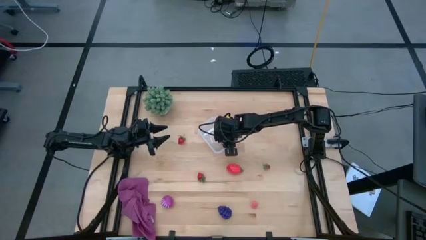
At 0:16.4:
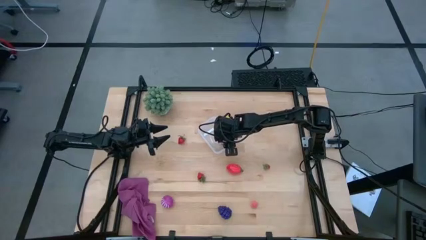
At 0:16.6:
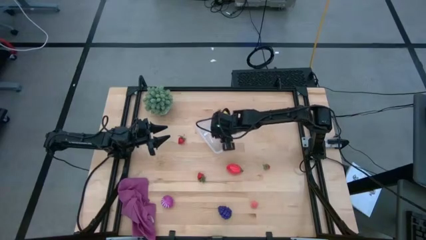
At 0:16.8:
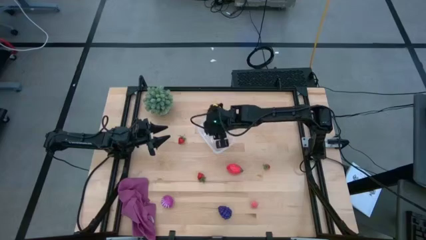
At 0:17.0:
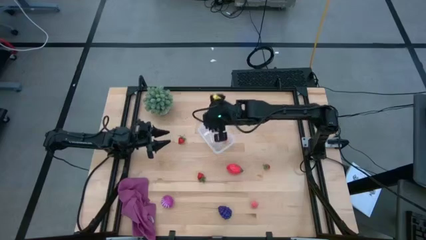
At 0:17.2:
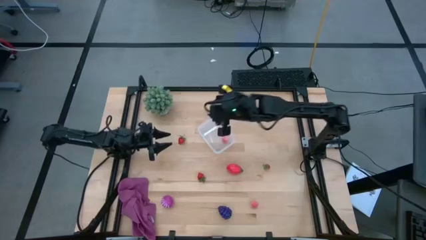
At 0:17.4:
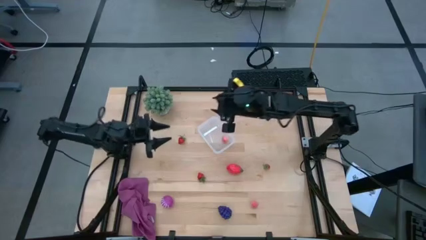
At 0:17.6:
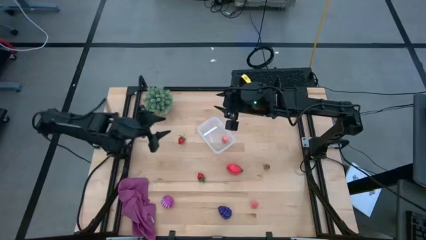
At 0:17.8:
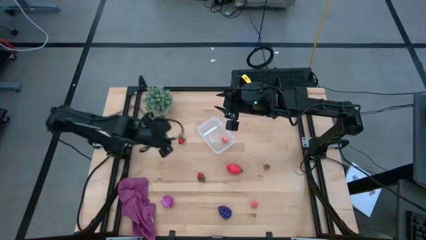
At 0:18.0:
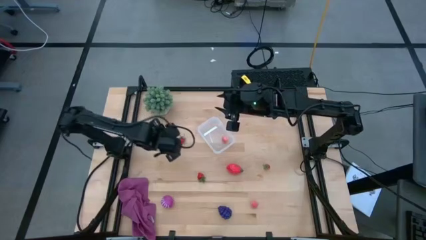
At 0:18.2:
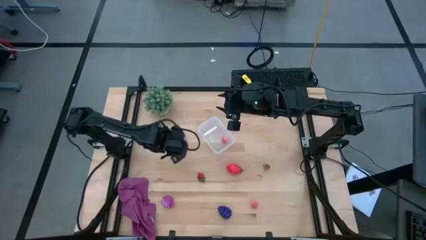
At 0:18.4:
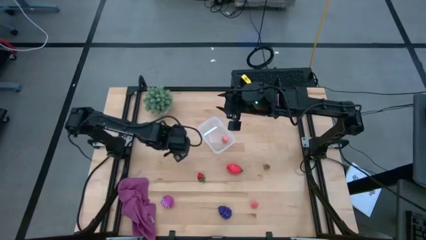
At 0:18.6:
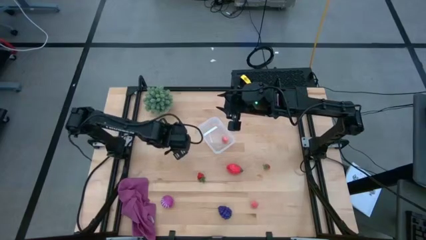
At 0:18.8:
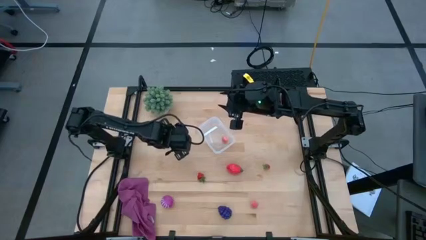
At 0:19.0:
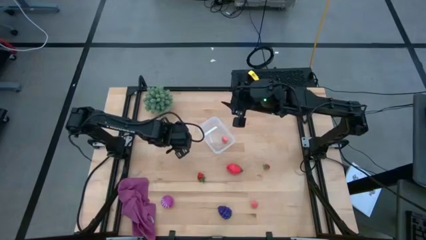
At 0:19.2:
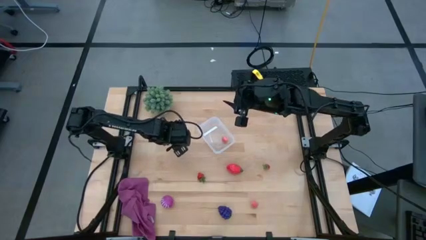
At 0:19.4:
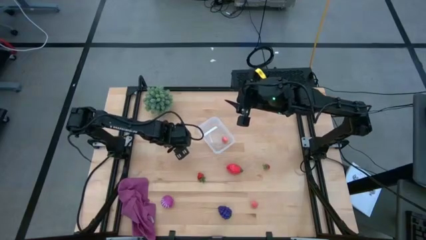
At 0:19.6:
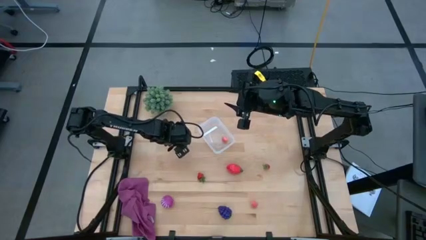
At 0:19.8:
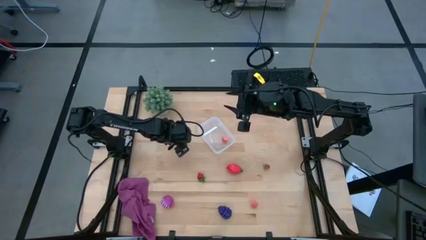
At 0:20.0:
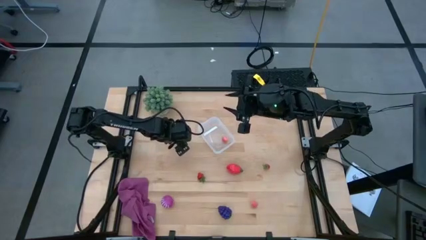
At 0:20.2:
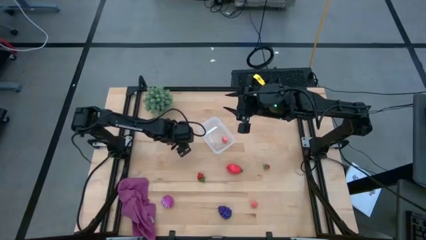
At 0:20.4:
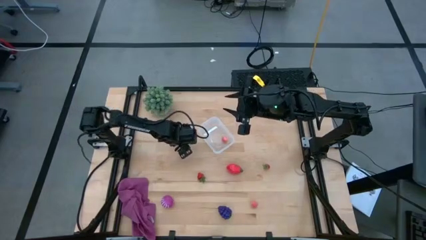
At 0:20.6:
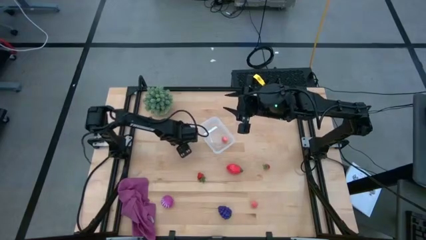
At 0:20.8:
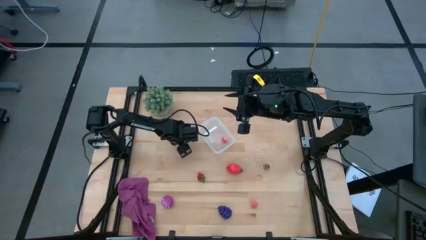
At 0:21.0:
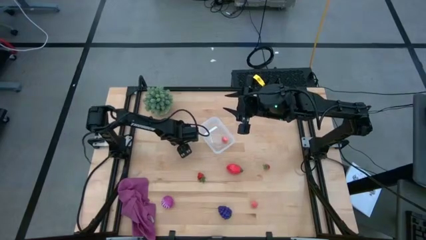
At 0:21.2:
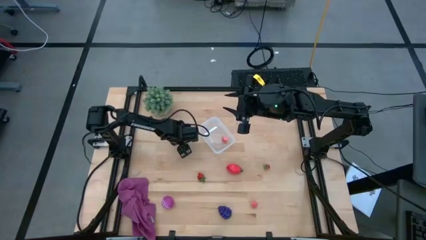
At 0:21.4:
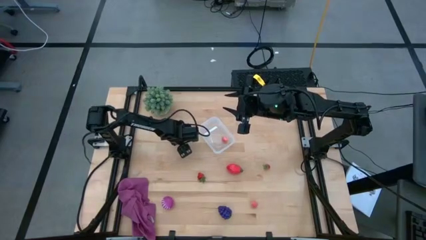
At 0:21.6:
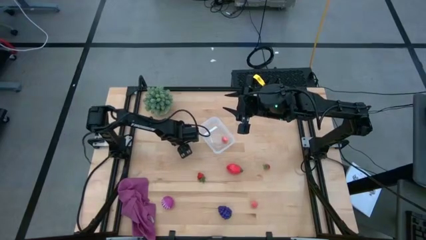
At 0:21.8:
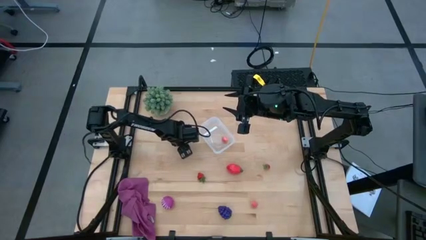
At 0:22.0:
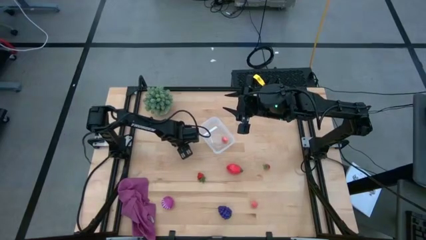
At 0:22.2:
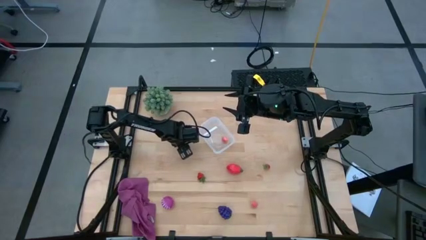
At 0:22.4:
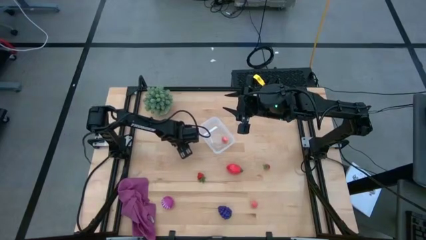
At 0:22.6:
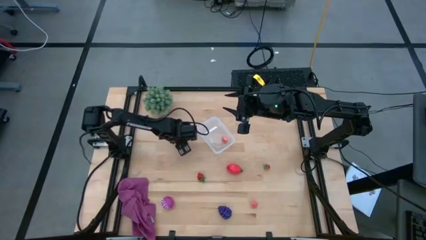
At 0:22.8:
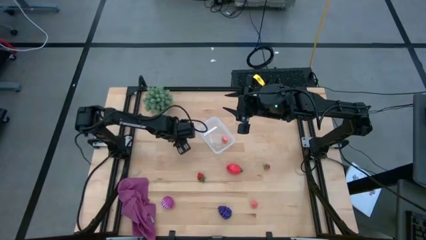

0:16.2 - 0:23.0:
Task: Pick and placing Produce into tupperware
Put the left strawberry into the transparent bin

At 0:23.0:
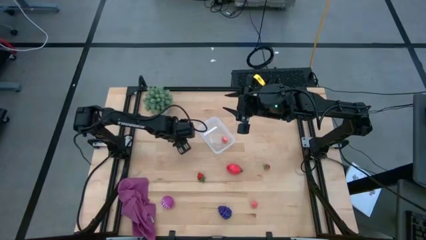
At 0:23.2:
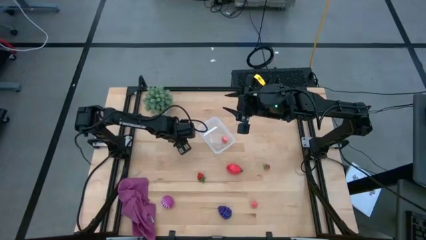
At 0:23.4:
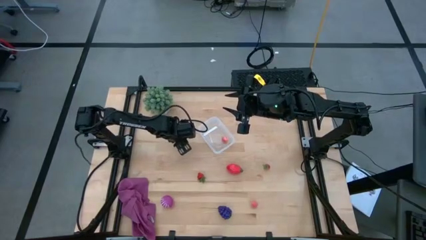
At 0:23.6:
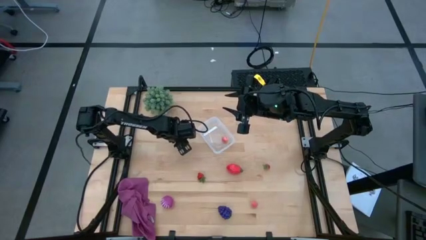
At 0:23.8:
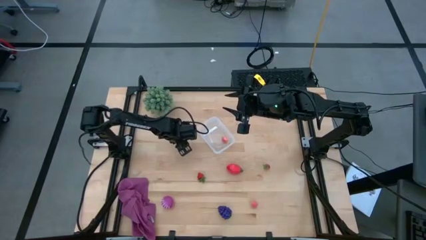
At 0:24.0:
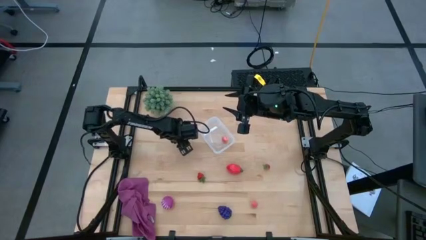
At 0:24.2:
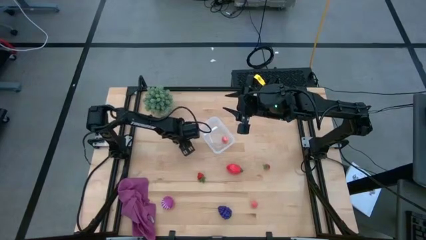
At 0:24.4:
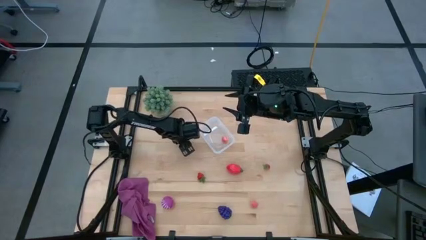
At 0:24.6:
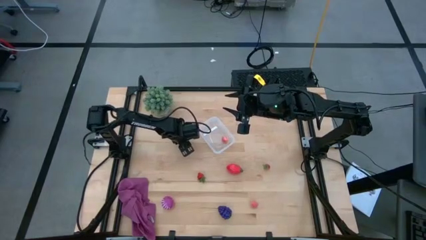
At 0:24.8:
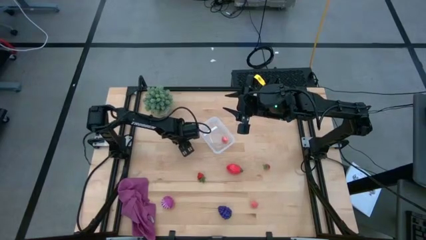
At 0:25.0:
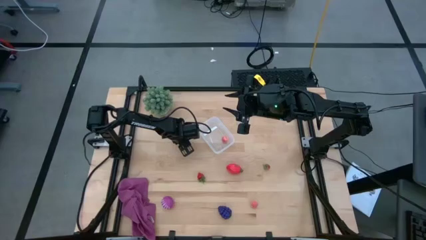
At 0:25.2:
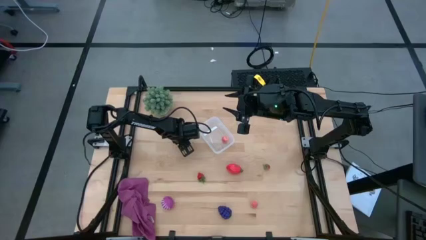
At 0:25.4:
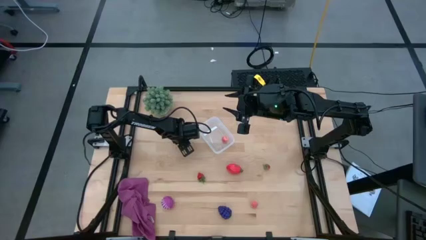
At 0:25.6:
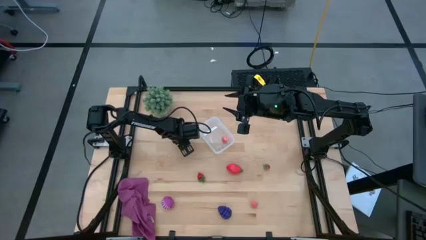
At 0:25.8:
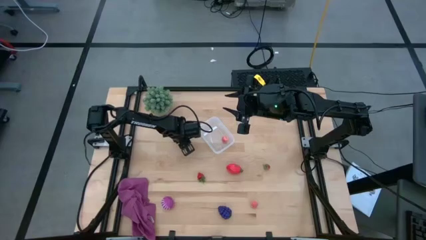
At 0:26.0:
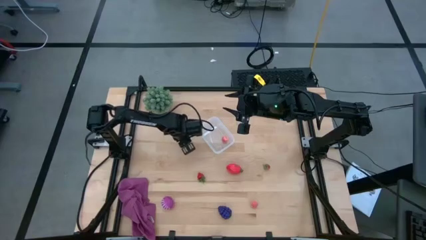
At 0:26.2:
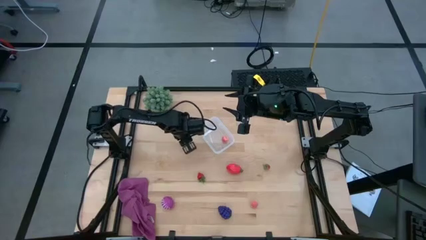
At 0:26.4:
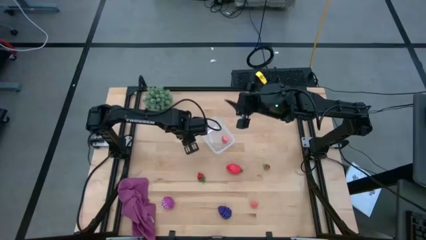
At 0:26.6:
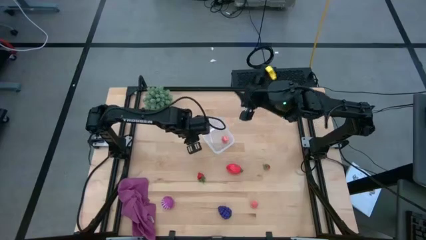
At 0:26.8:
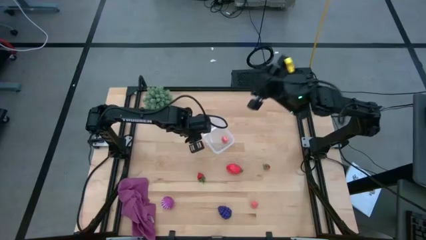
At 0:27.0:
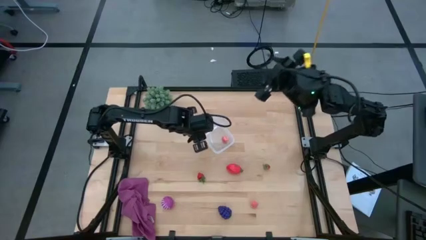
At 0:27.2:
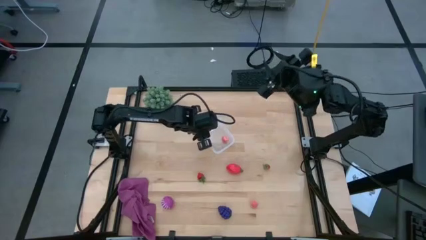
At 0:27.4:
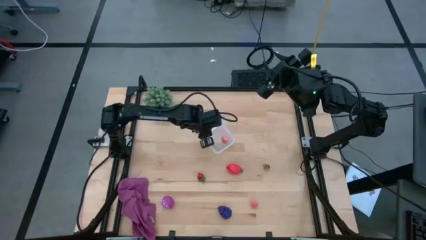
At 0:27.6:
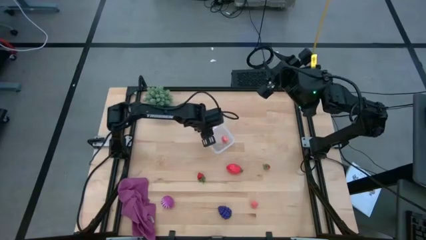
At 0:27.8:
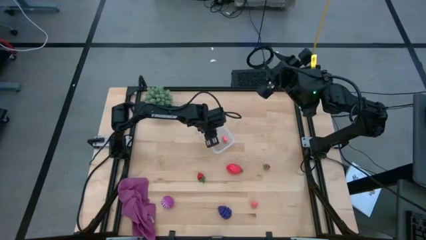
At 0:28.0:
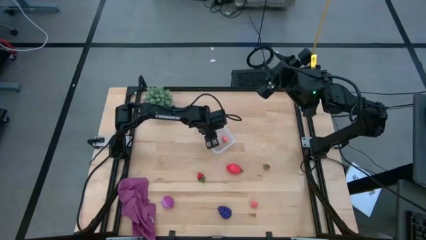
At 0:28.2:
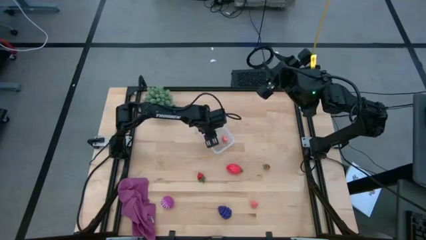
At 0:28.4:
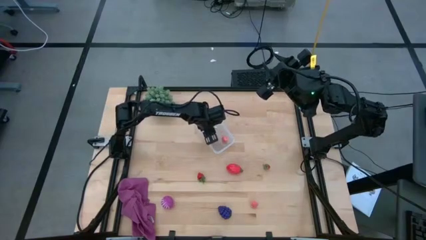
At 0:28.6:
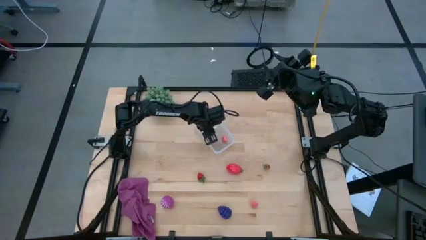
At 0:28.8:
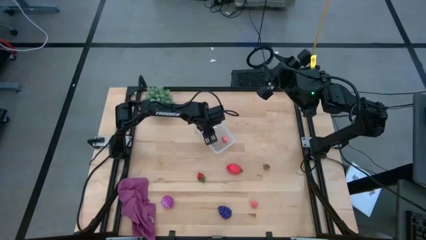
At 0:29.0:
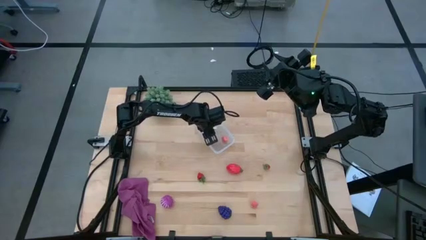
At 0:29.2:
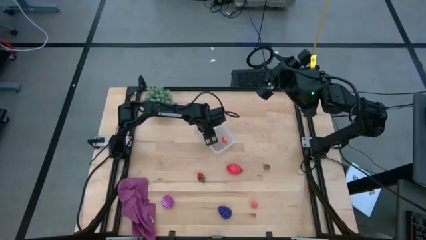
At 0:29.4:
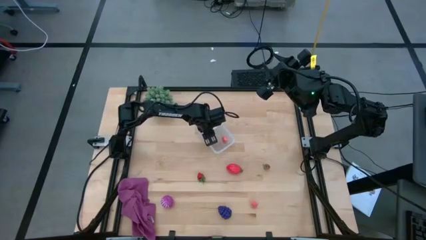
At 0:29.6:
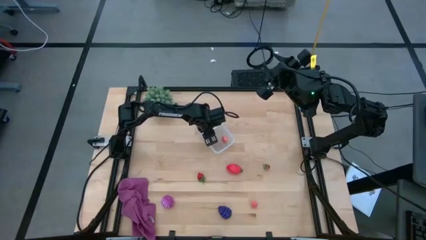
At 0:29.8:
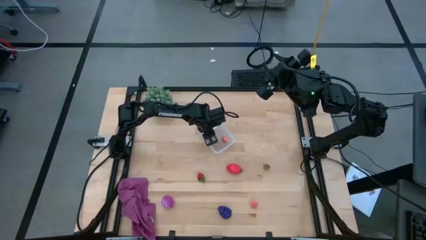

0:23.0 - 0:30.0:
Put the left strawberry into the transparent bin
